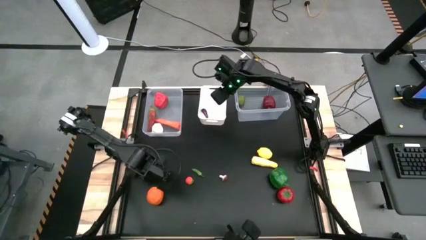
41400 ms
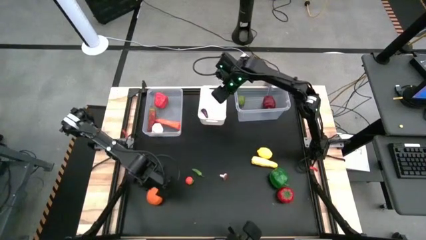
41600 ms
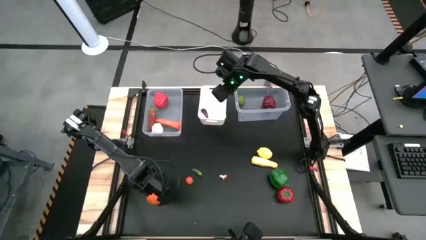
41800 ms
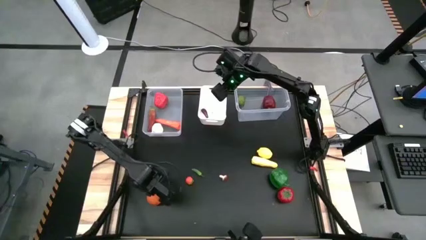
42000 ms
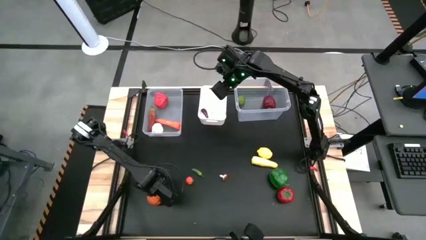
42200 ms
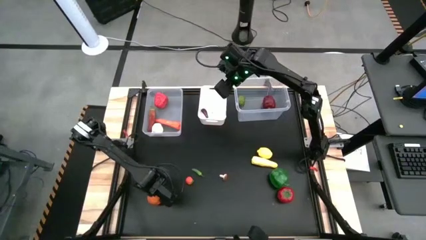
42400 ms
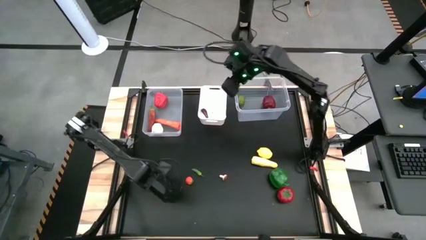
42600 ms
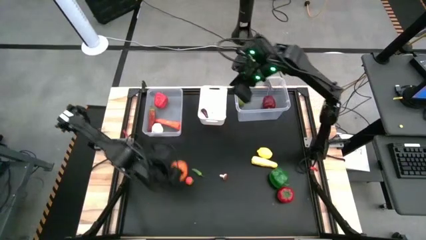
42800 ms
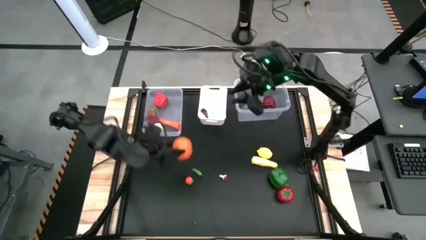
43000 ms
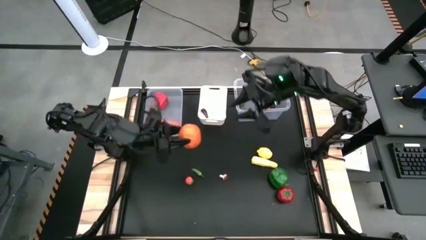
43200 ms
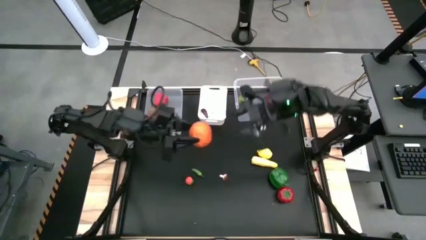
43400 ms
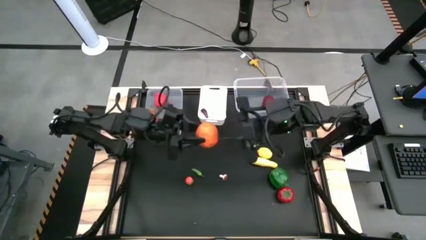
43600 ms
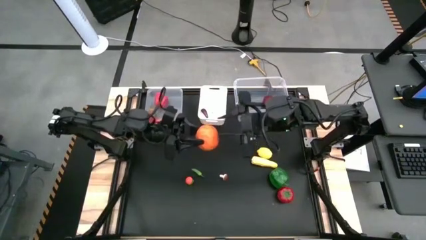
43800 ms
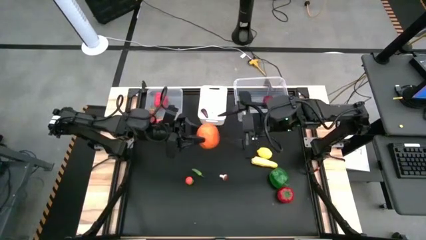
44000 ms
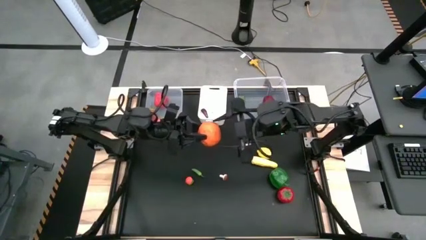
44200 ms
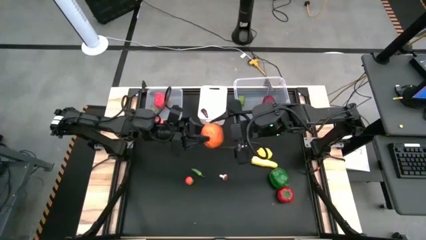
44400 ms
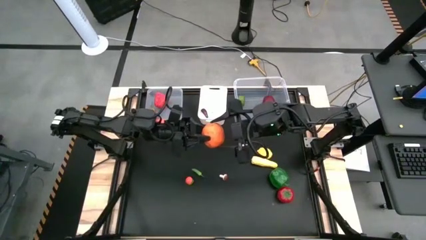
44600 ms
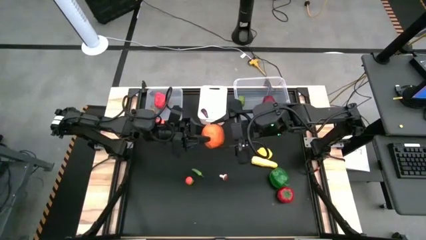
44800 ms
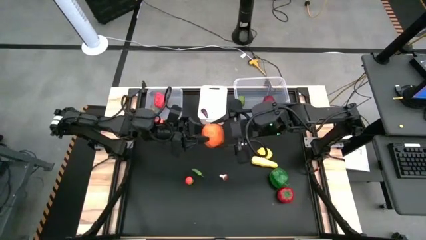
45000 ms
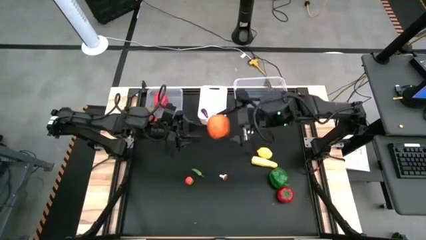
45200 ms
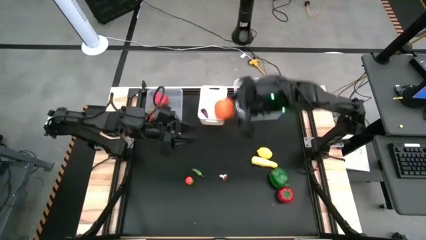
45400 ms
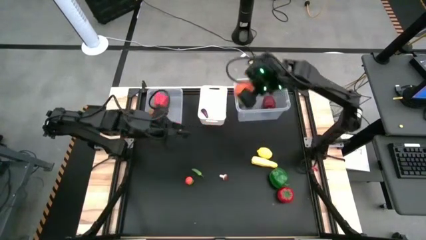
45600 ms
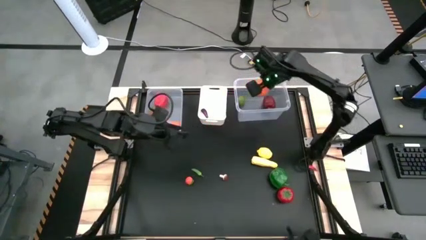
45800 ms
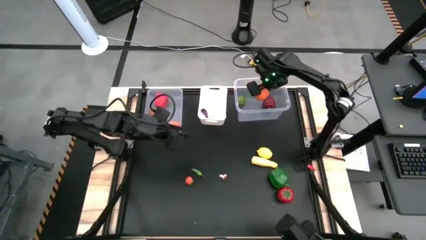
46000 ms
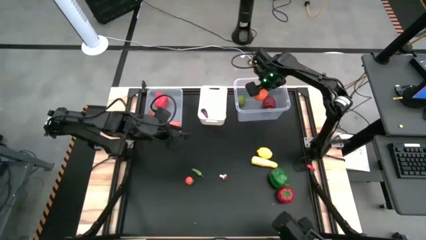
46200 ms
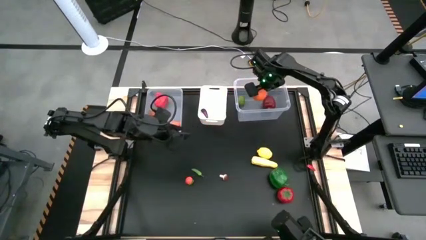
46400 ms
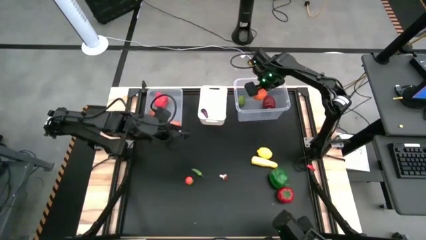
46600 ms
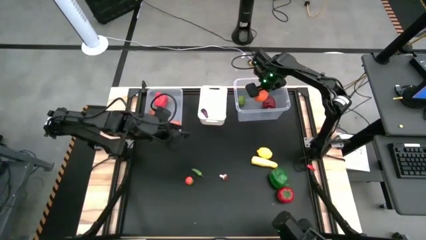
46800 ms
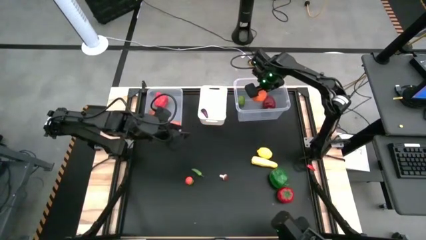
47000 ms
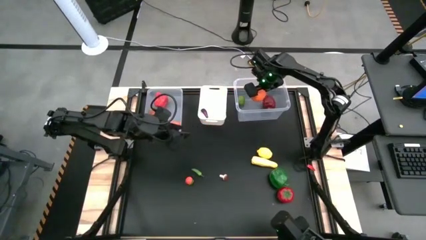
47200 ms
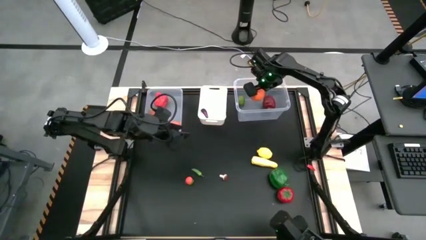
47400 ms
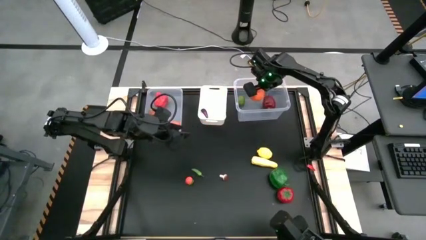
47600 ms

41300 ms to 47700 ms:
Task: Sort produce into baskets
Put the orange into the right transparent bin

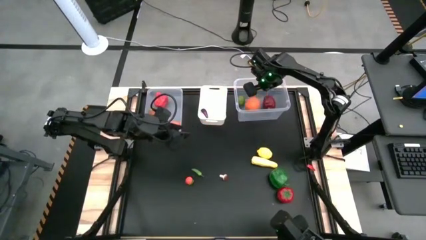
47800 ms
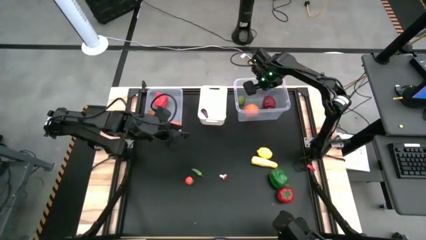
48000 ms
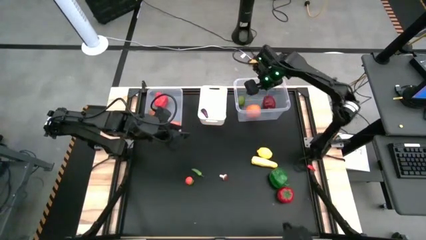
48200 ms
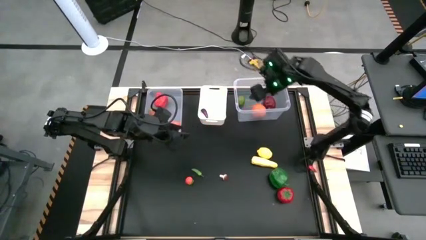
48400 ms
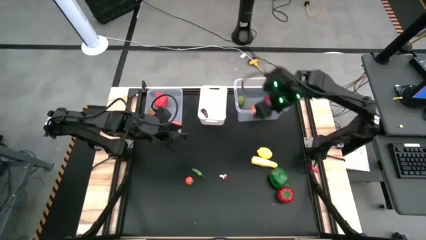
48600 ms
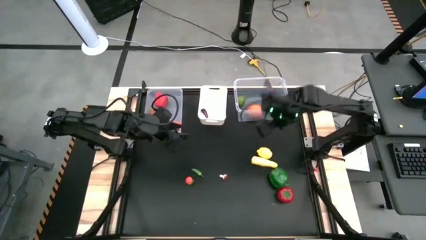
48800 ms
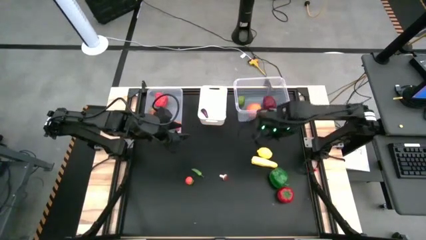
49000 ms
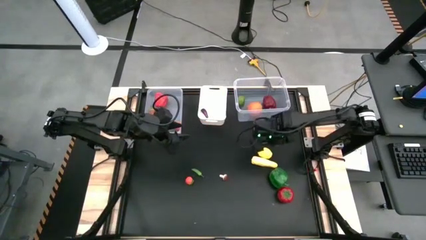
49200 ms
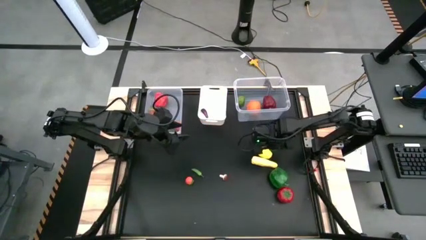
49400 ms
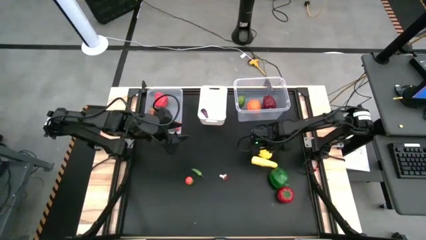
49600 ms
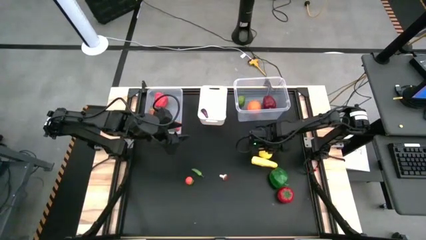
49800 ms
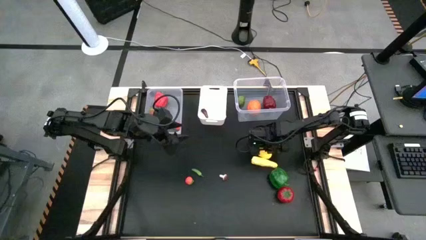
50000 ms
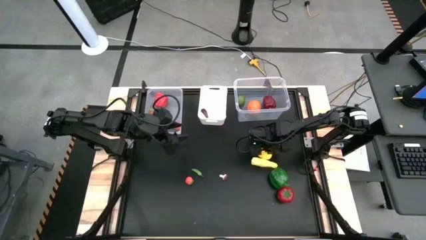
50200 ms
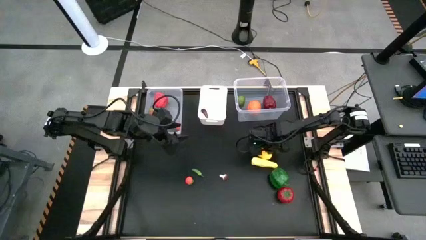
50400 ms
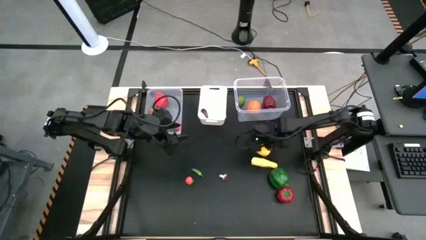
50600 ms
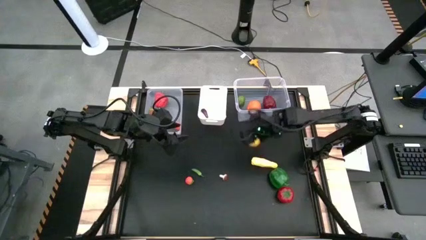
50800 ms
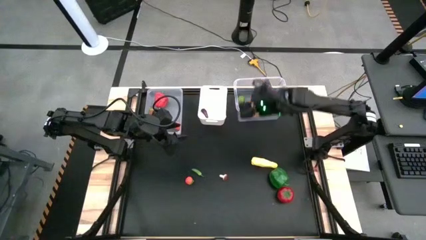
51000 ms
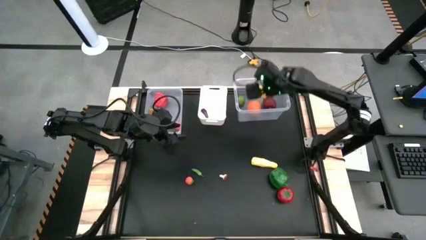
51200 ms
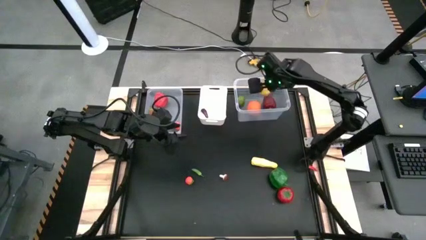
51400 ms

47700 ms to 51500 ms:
Put the lemon into the right transparent bin

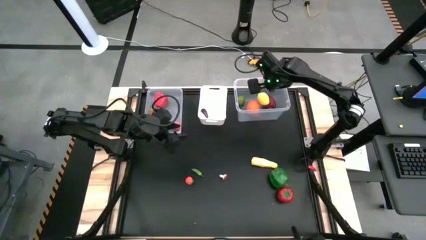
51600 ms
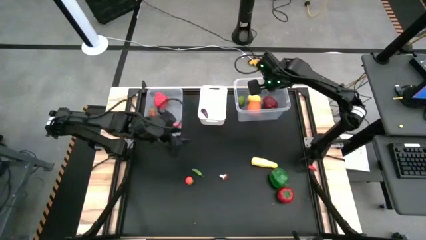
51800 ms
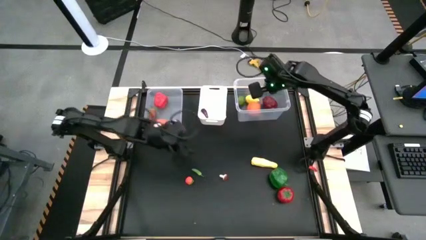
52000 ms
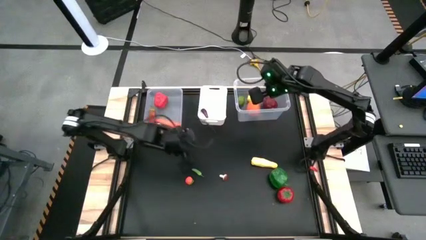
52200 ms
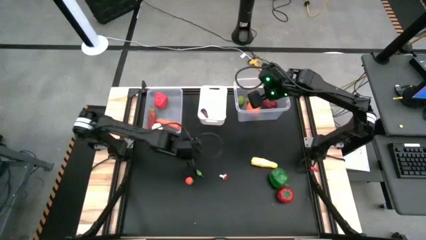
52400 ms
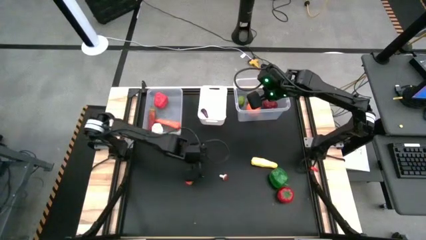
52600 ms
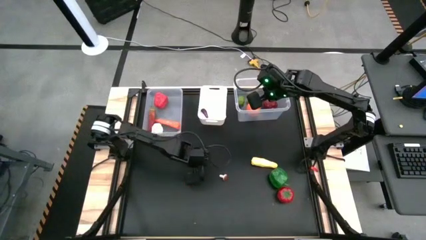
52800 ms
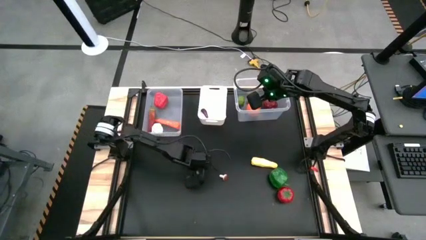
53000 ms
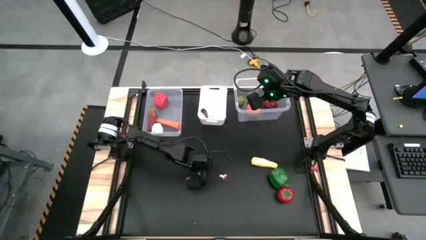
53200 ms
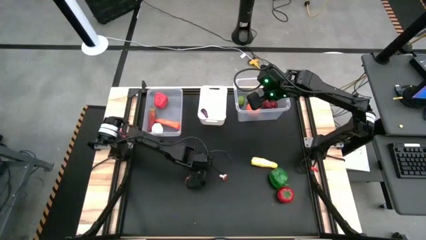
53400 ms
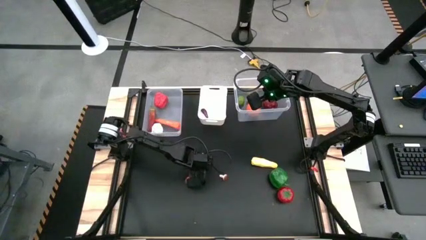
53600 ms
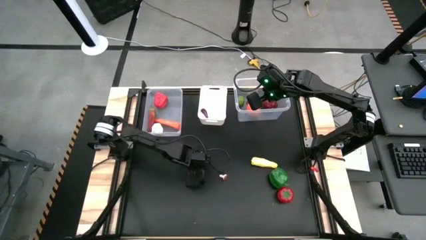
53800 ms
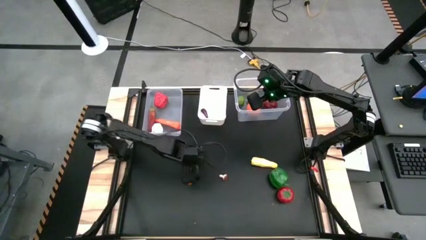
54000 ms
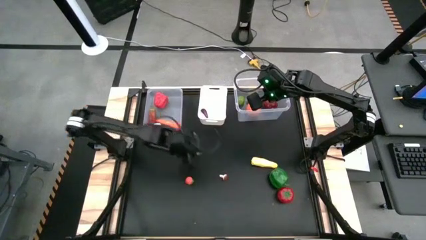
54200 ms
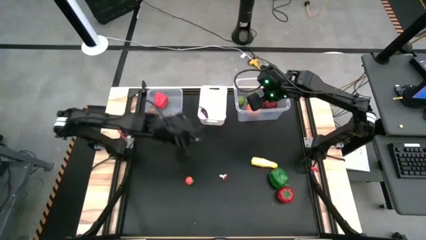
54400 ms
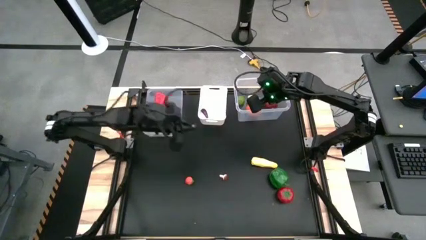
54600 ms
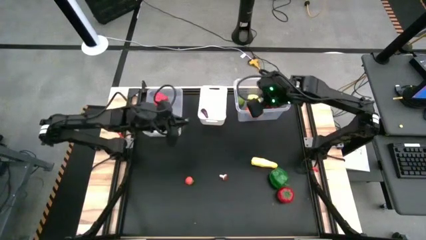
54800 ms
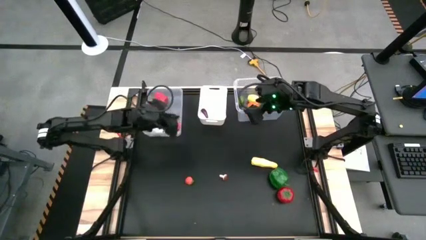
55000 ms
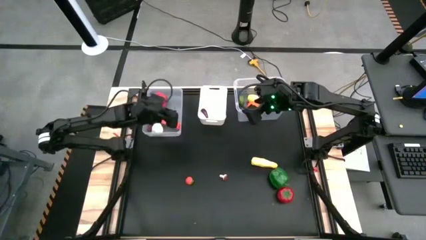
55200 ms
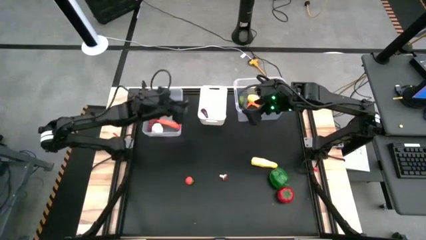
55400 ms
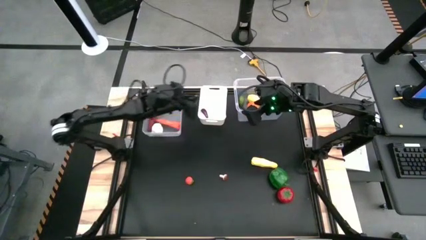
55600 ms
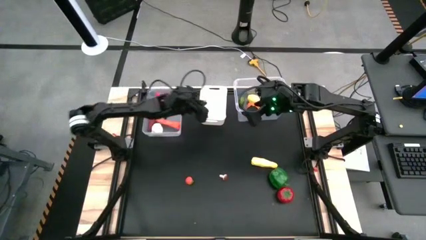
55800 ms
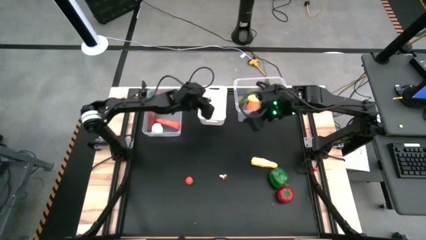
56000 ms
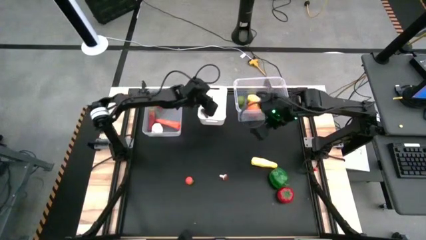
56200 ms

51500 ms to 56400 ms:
Put the green chili pepper into the white bin

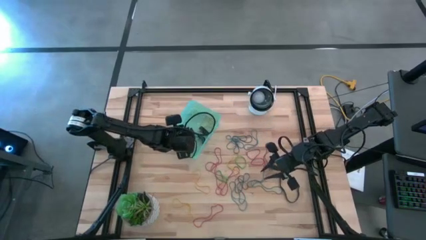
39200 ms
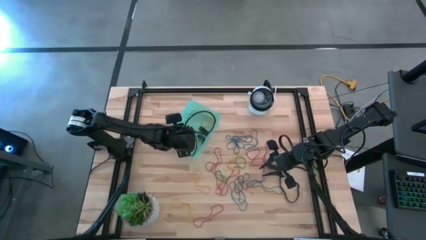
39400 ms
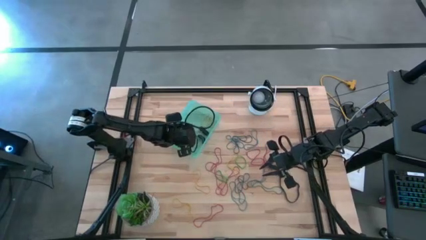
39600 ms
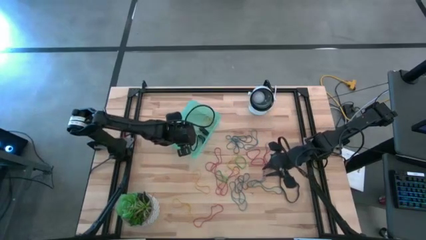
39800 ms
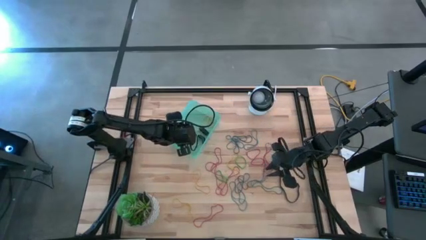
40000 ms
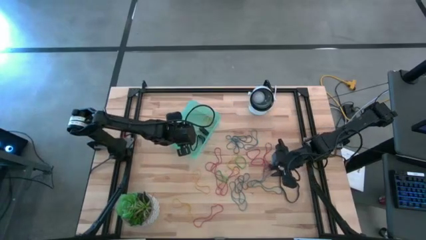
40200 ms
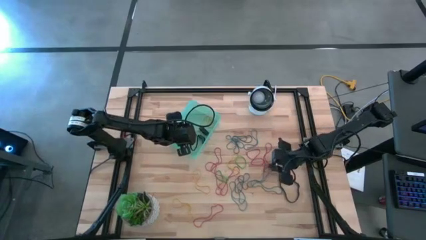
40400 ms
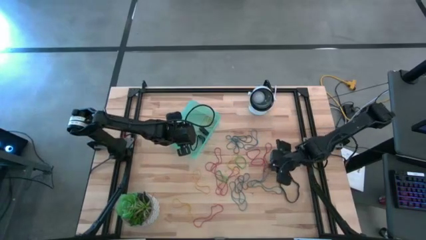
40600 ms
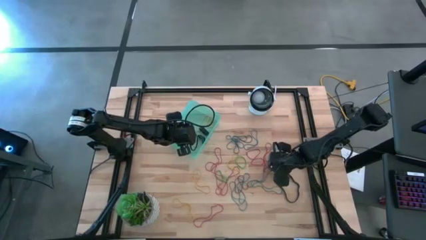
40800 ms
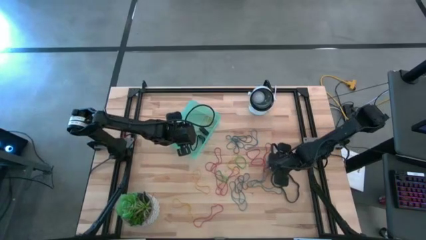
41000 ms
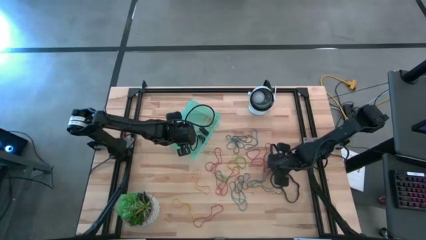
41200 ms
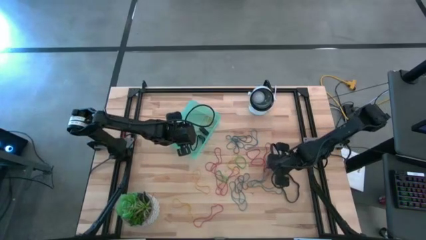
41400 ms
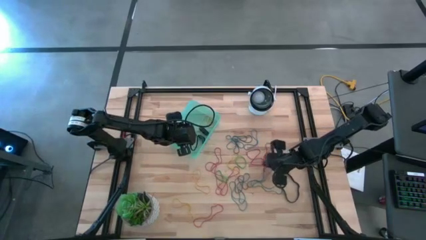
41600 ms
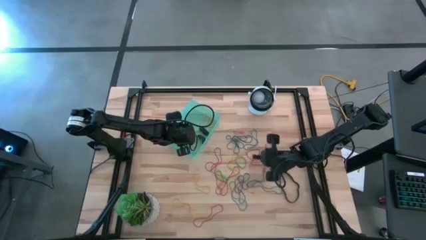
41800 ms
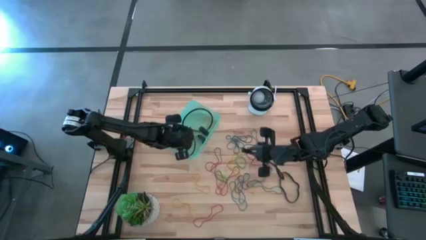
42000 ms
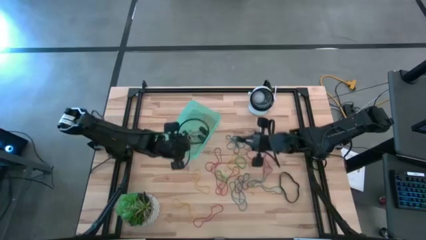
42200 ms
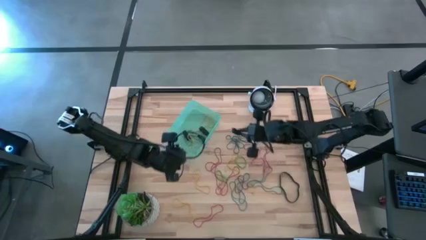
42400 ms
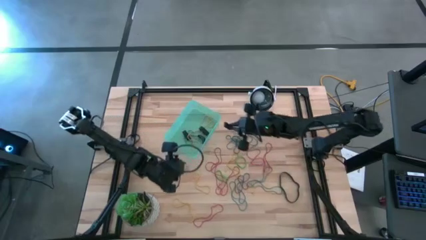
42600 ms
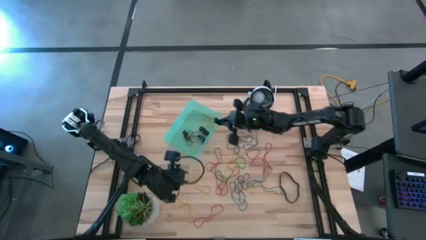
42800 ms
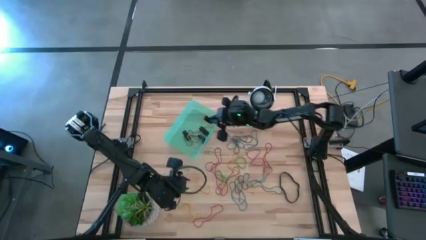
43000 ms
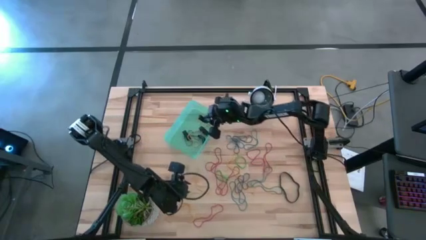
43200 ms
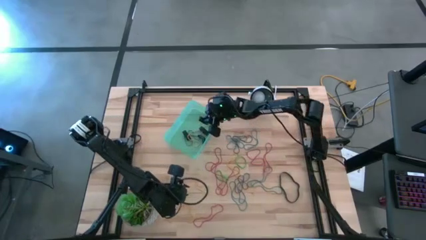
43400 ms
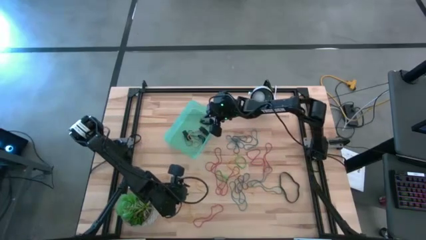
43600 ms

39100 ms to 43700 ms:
Task: Pick and place rubber bands into bin
Put the black rubber band into the green bin
